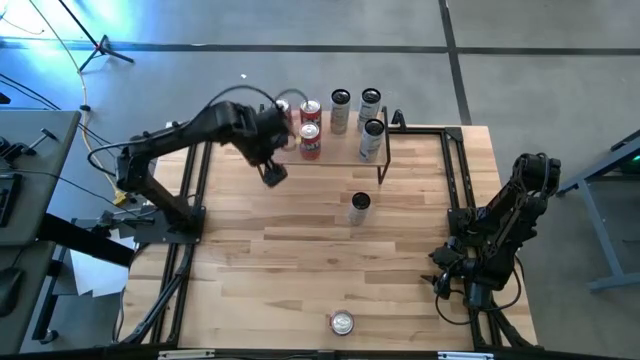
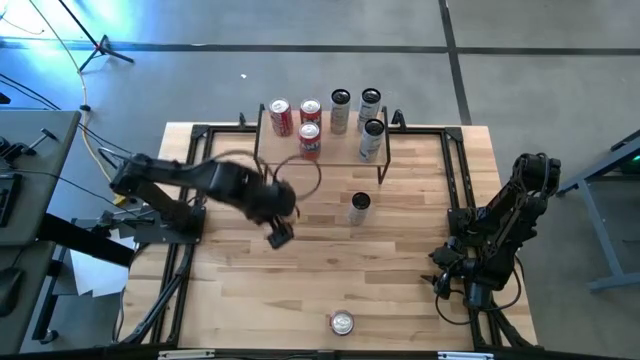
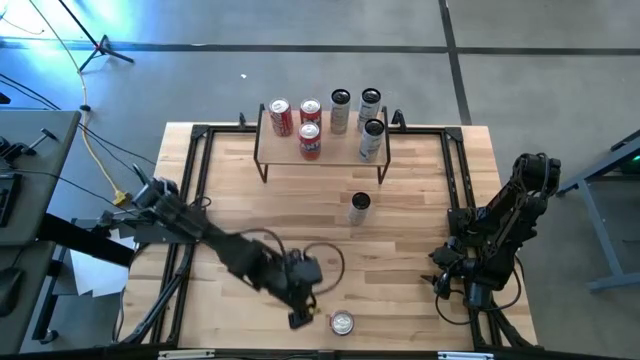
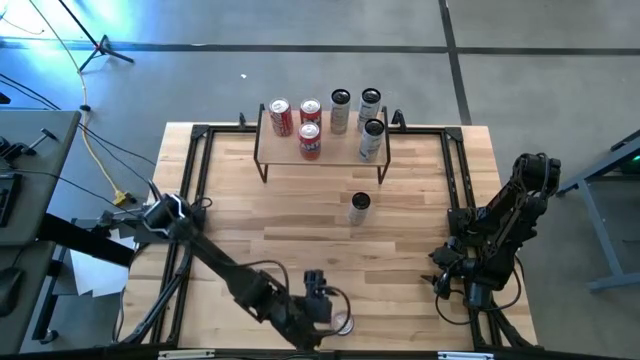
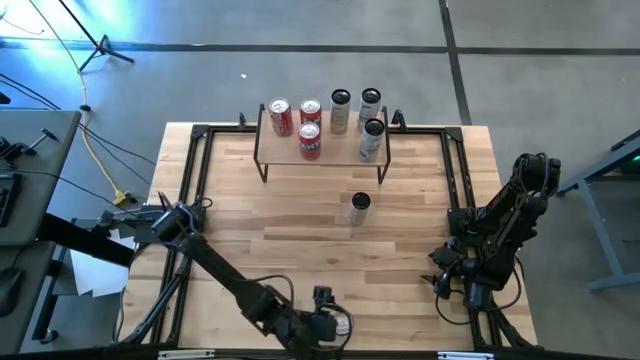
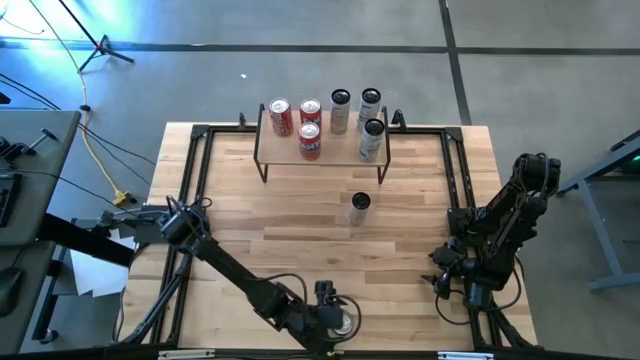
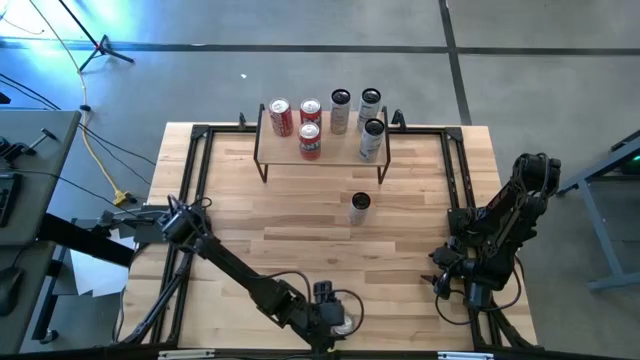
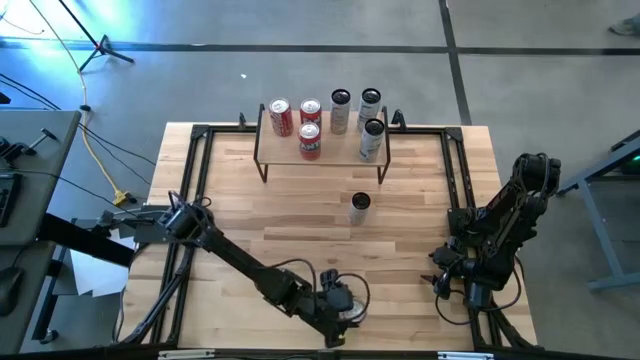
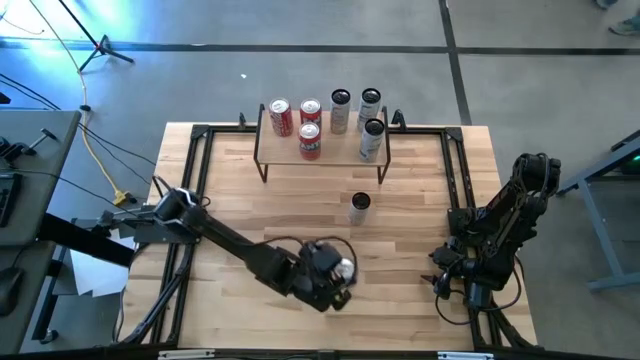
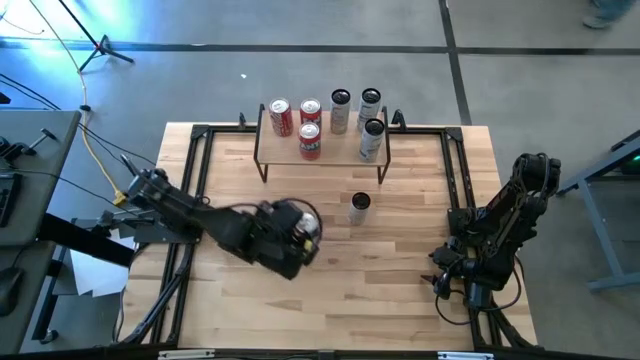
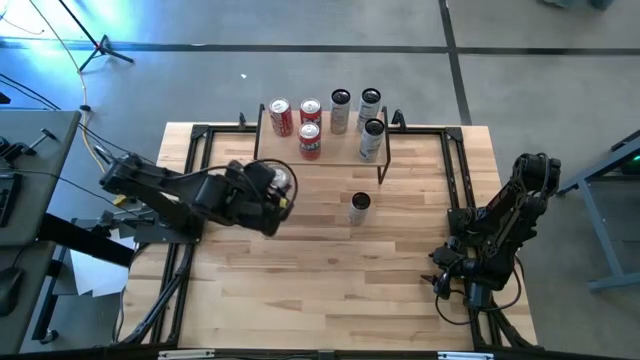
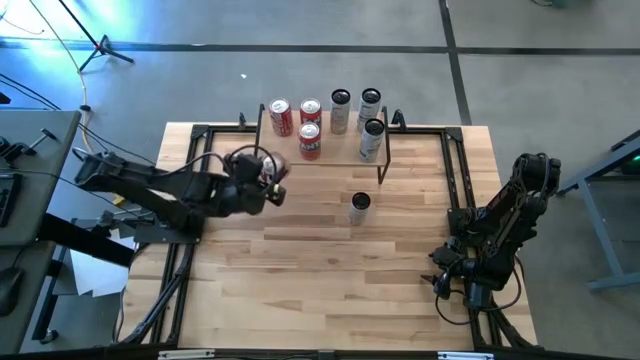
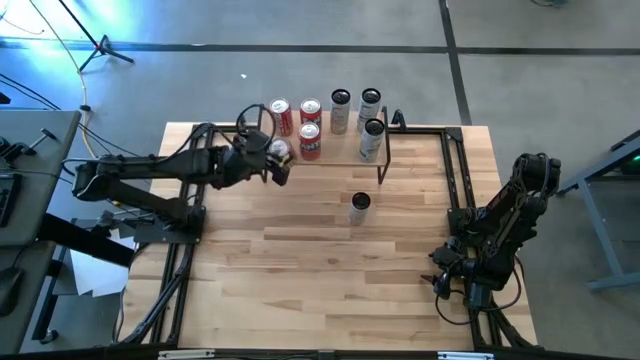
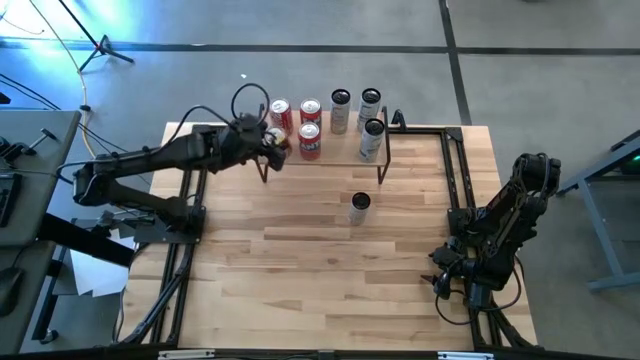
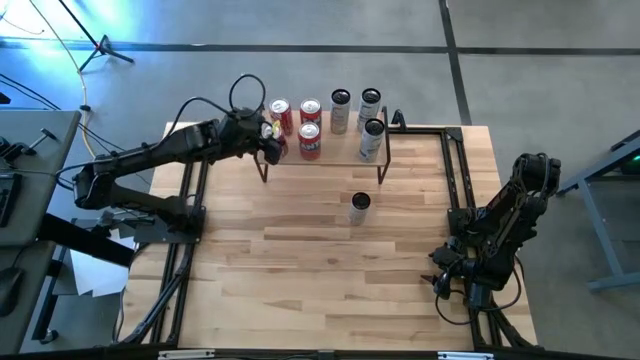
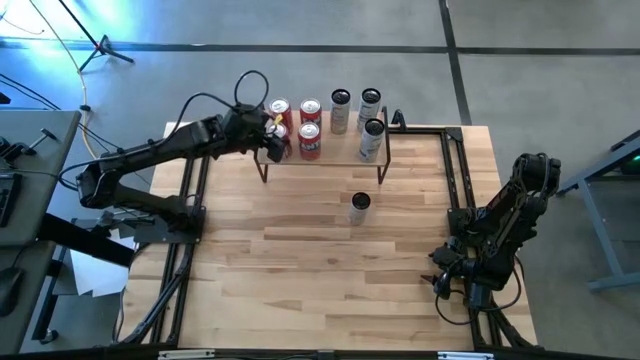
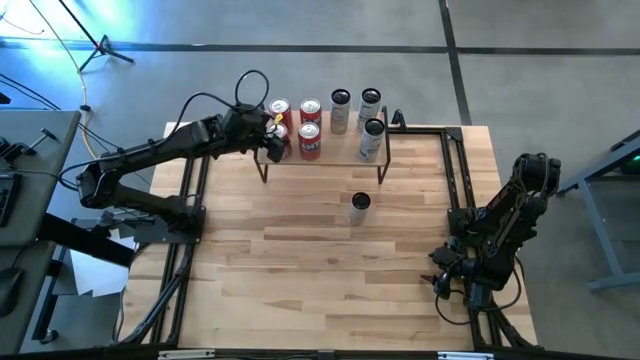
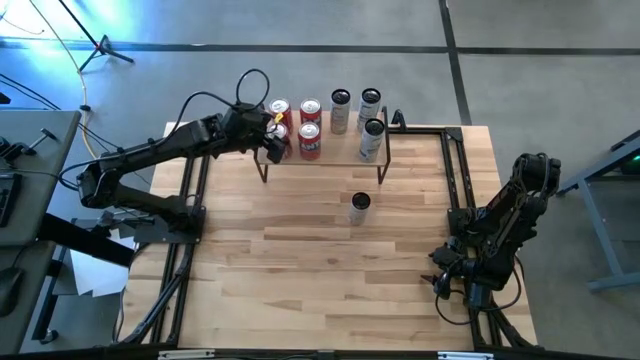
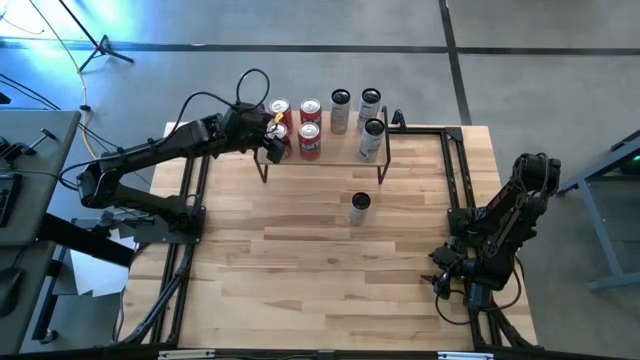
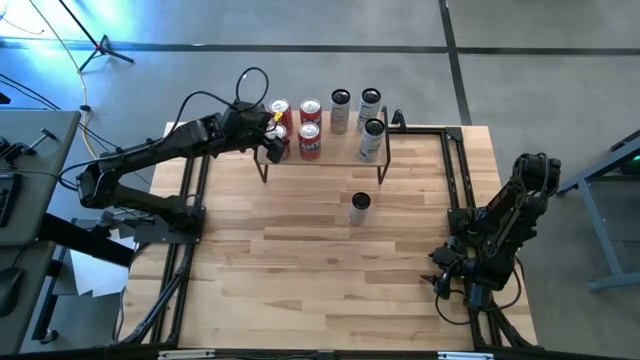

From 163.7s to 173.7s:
Task: Place canned beverage on shelf
Put the red white soda can on the shelf aligned with the red white soda can

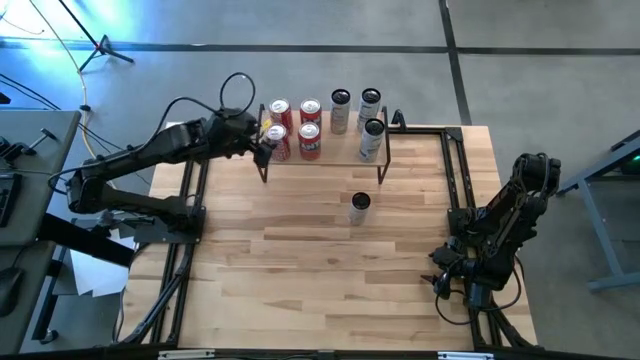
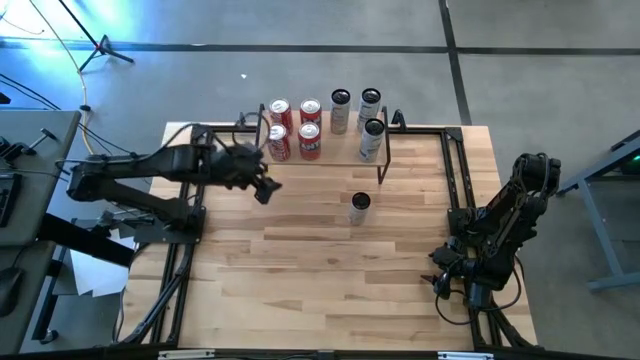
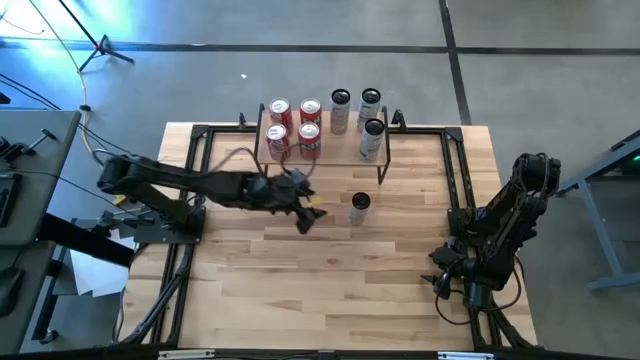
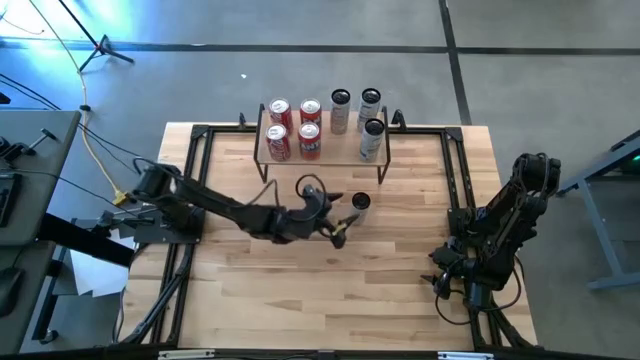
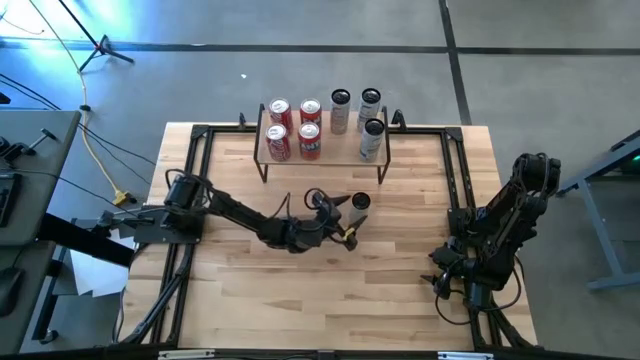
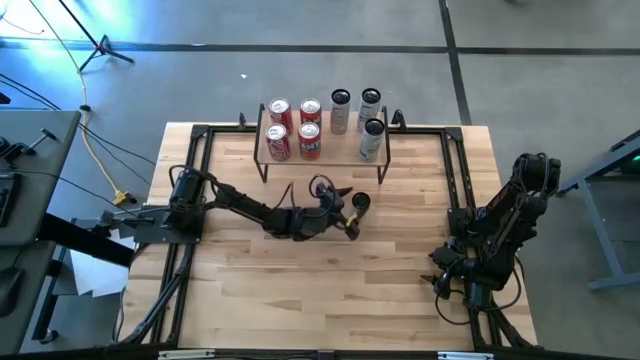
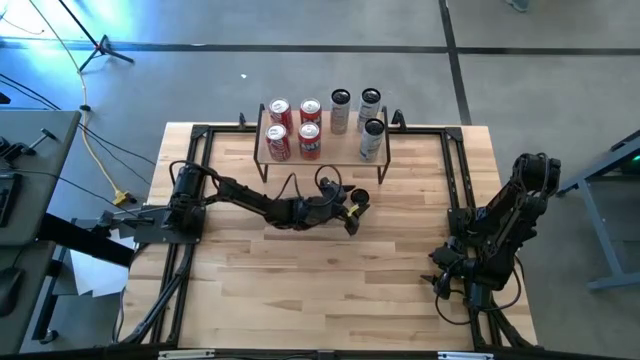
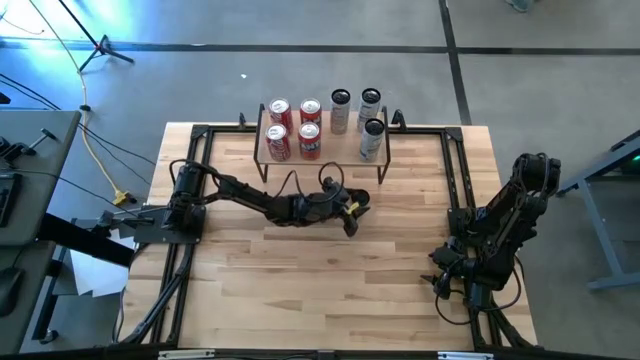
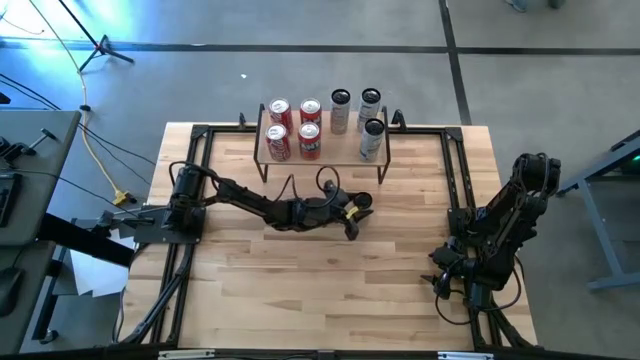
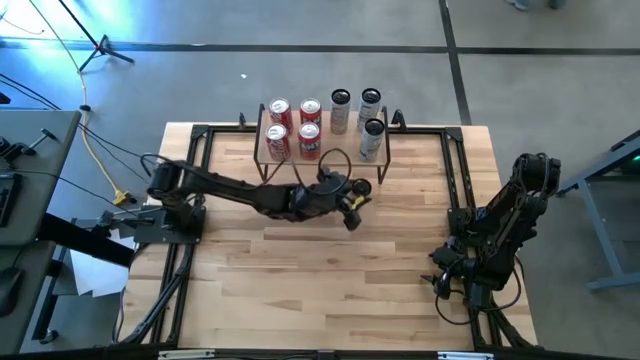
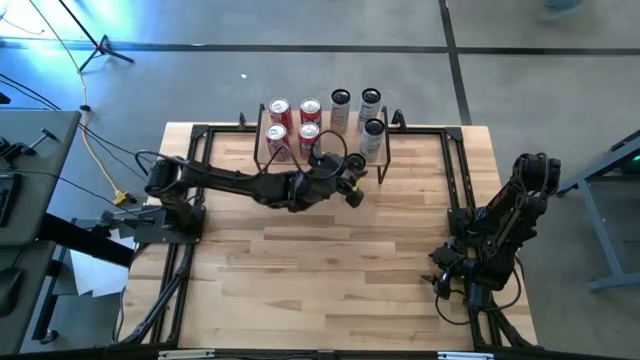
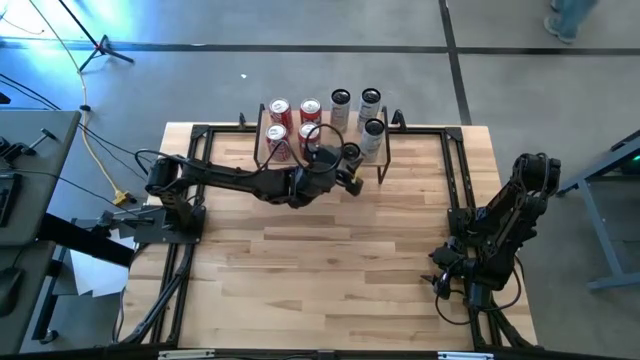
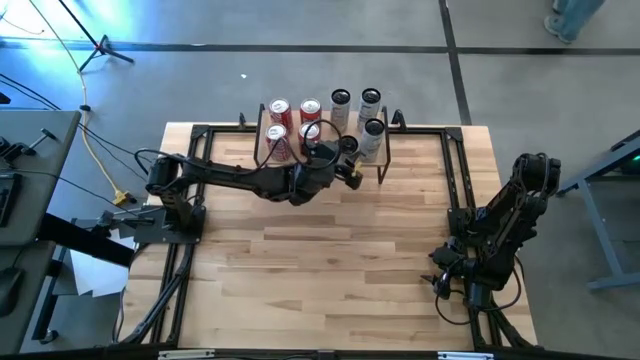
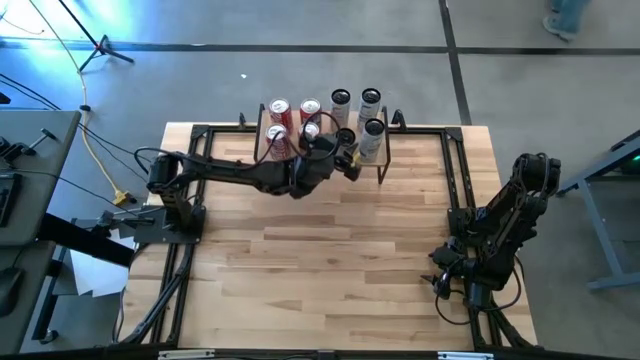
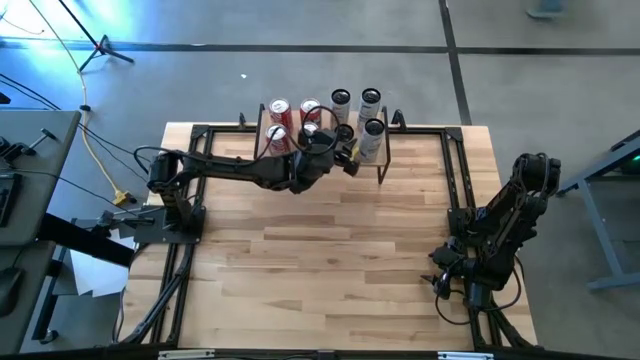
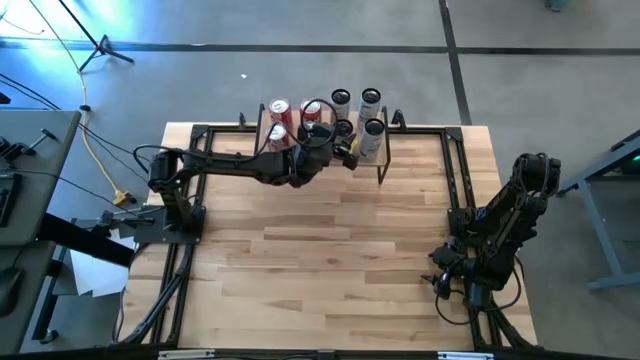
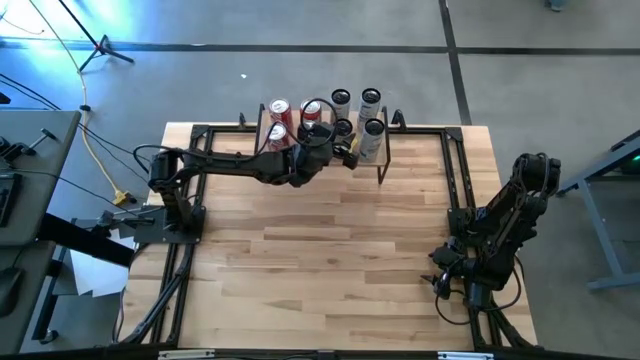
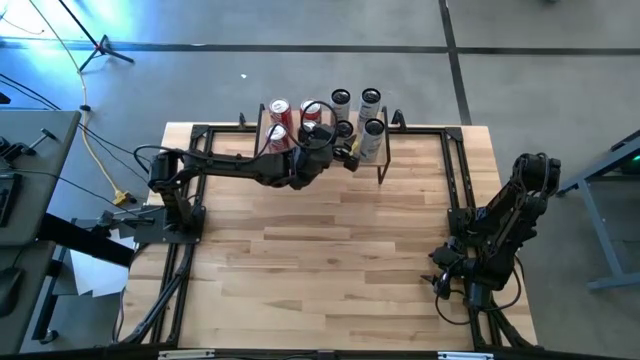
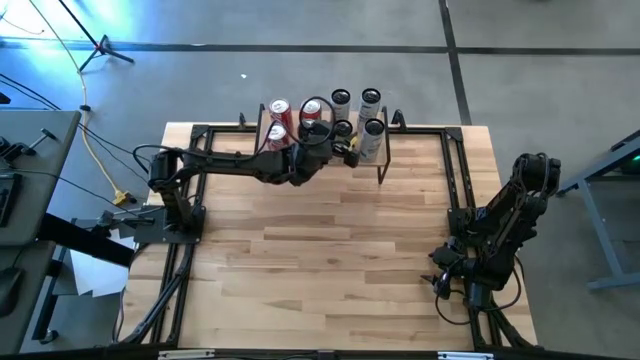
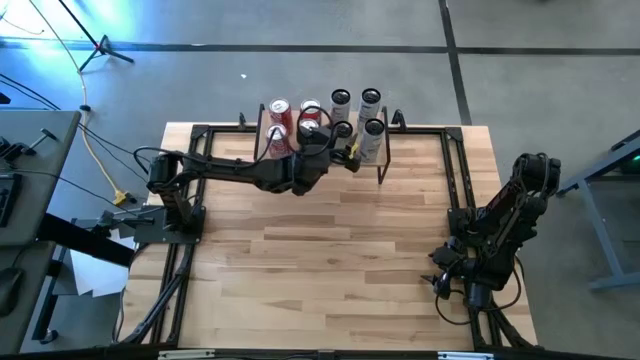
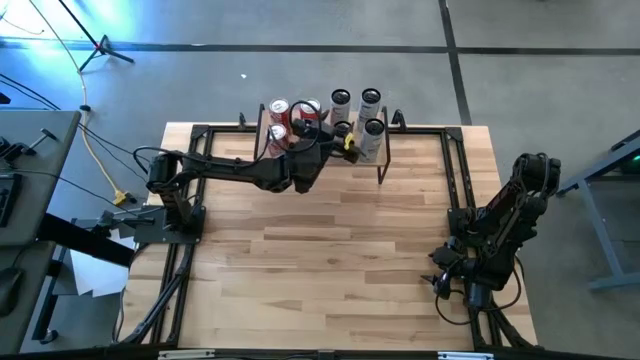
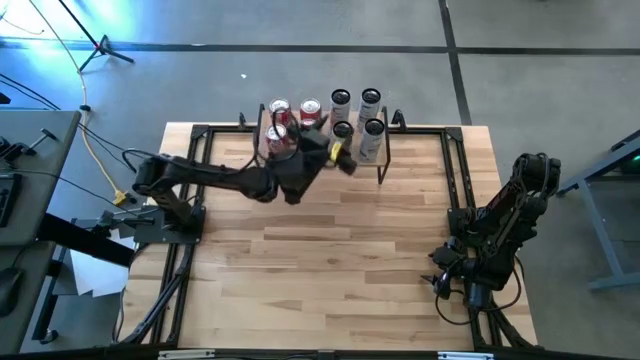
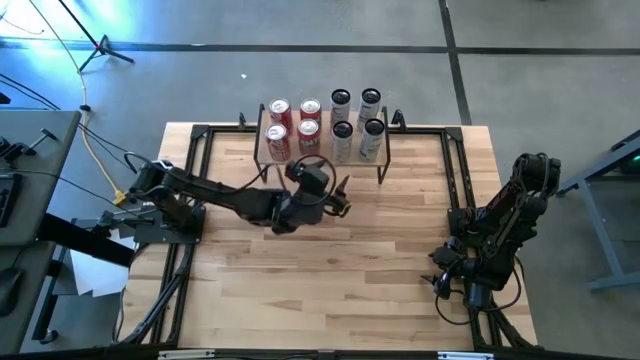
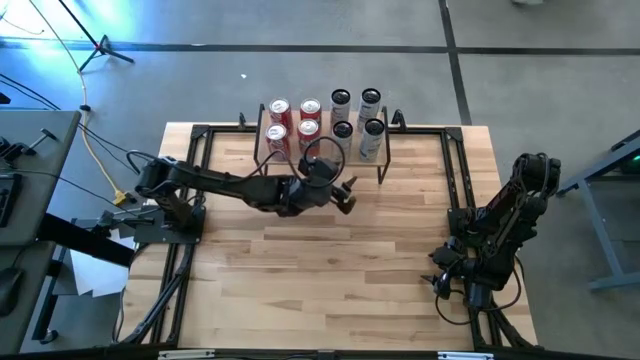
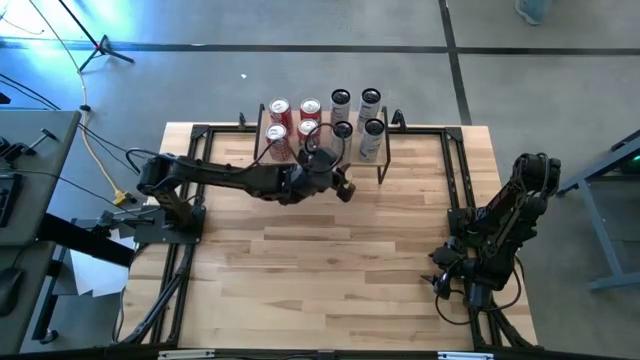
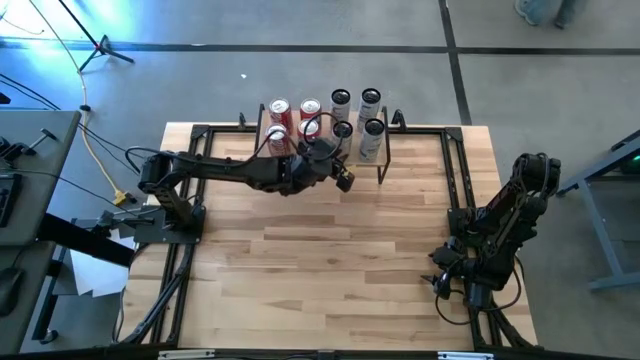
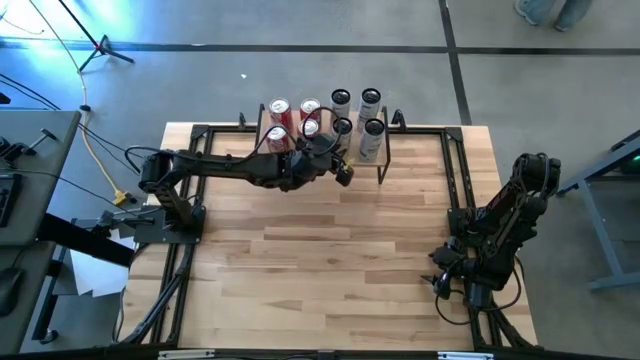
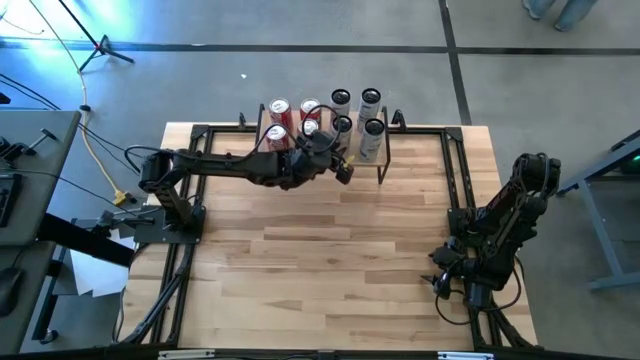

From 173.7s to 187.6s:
Put the white yellow soda can on the shelf aligned with the white yellow soda can
